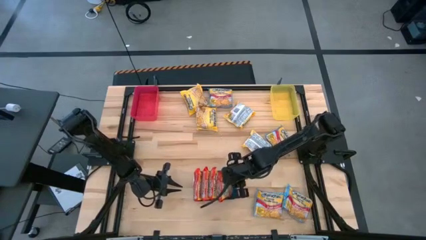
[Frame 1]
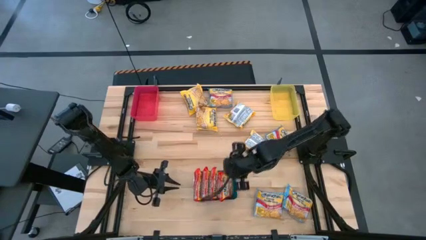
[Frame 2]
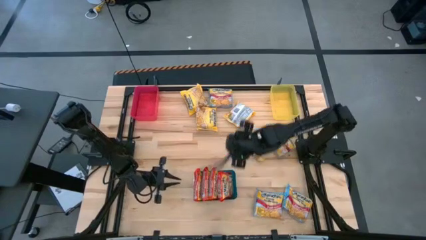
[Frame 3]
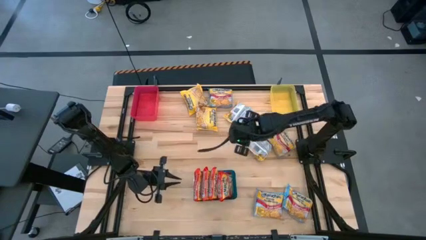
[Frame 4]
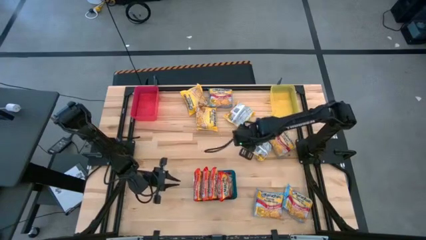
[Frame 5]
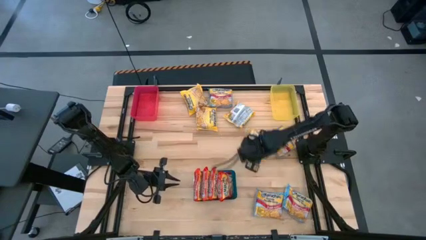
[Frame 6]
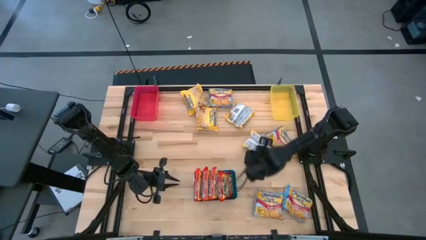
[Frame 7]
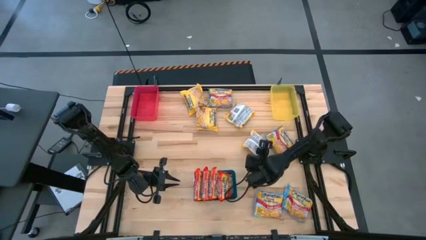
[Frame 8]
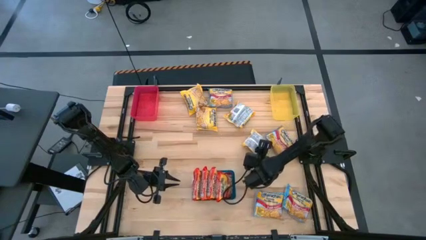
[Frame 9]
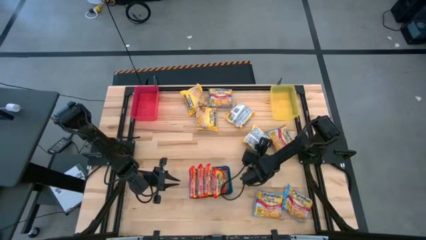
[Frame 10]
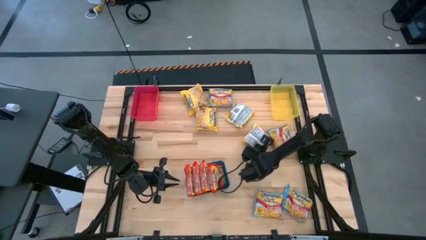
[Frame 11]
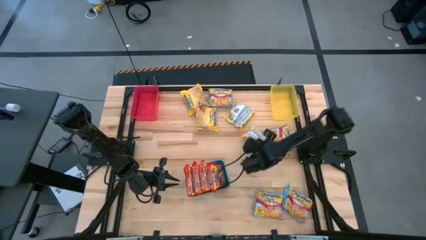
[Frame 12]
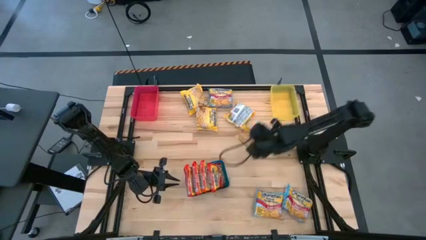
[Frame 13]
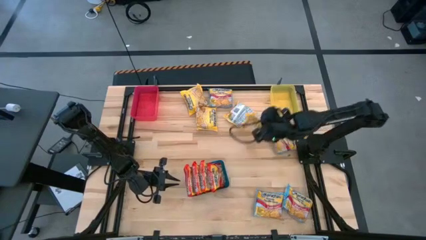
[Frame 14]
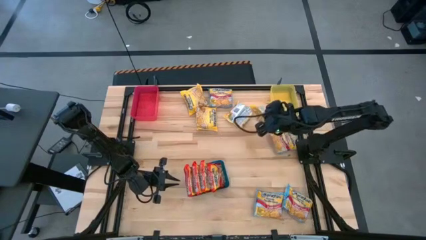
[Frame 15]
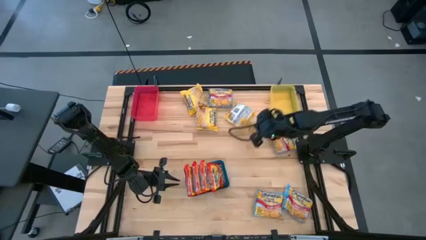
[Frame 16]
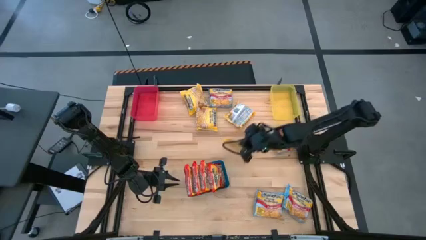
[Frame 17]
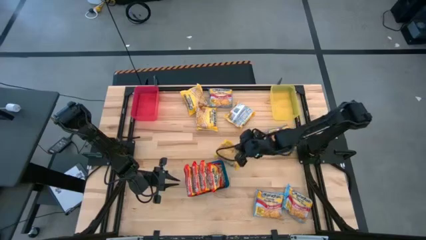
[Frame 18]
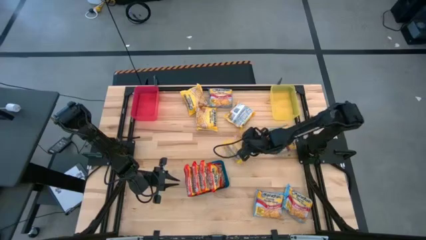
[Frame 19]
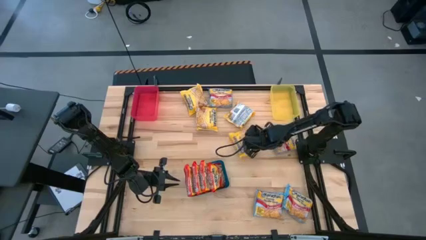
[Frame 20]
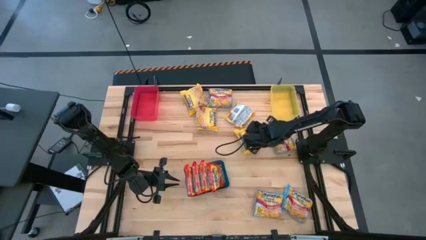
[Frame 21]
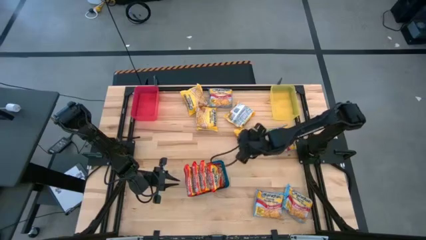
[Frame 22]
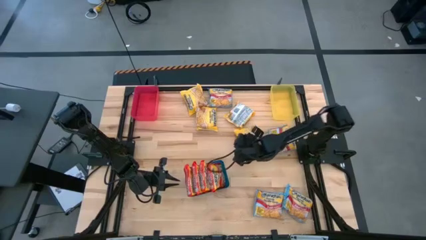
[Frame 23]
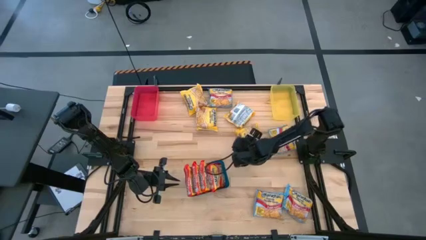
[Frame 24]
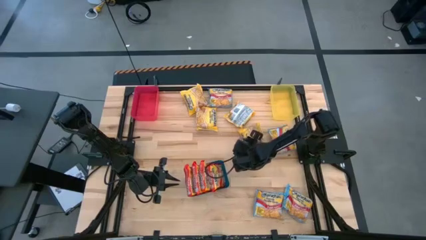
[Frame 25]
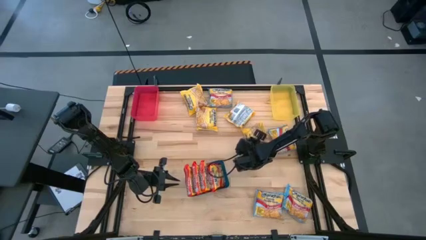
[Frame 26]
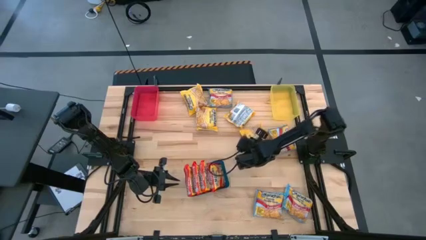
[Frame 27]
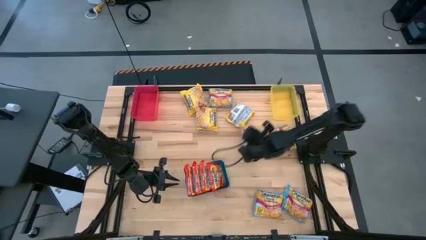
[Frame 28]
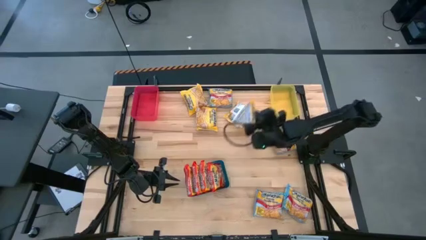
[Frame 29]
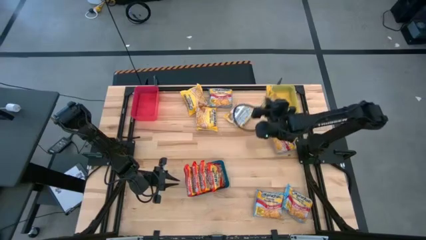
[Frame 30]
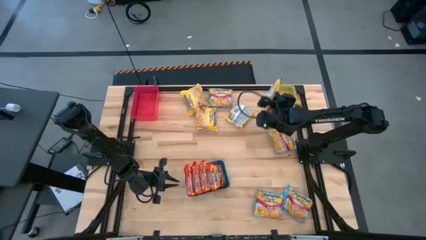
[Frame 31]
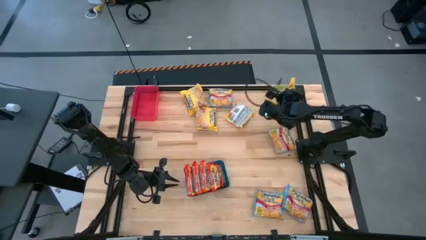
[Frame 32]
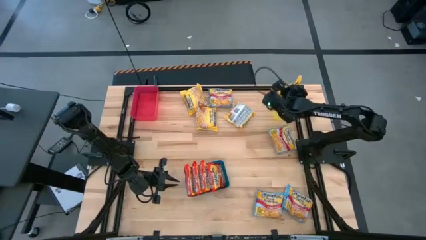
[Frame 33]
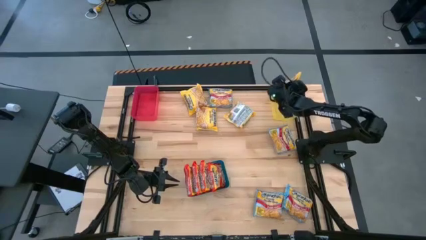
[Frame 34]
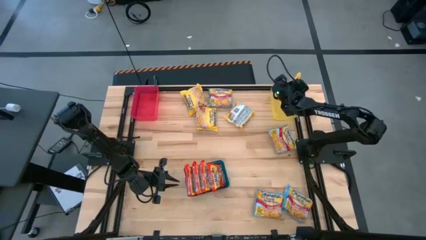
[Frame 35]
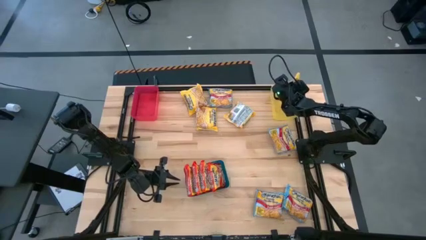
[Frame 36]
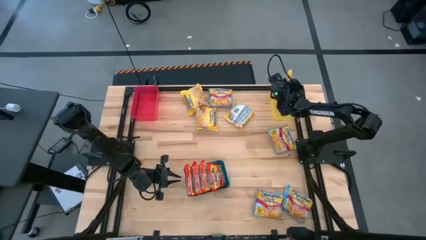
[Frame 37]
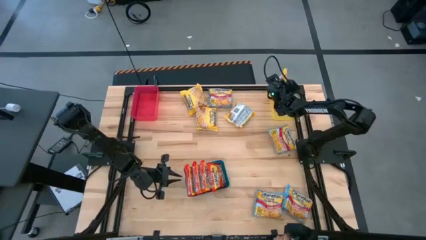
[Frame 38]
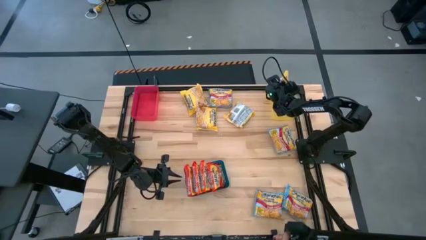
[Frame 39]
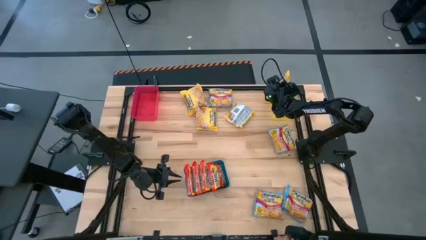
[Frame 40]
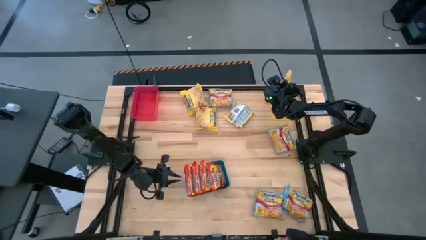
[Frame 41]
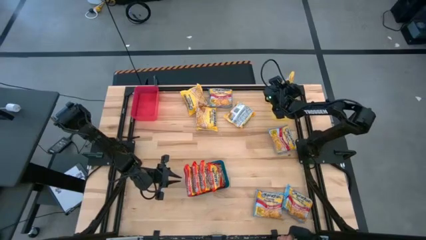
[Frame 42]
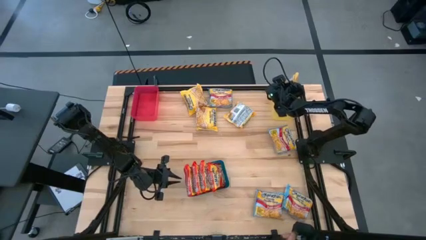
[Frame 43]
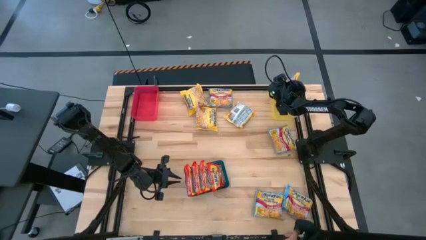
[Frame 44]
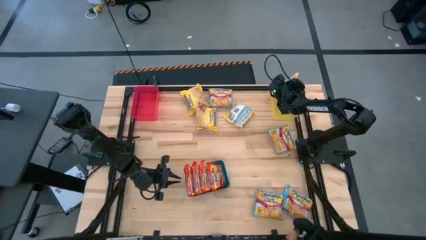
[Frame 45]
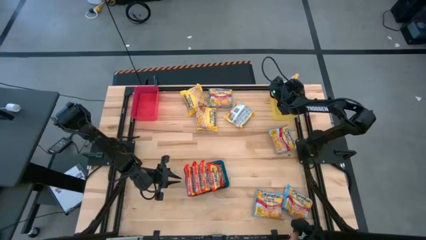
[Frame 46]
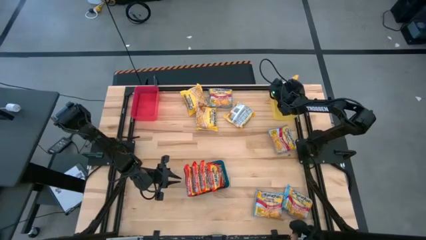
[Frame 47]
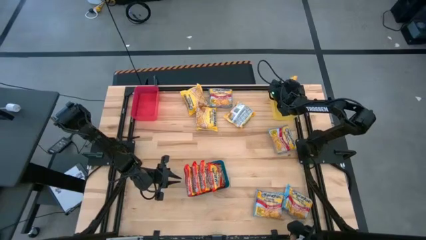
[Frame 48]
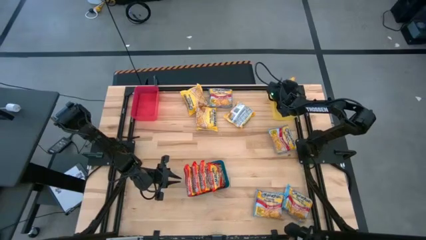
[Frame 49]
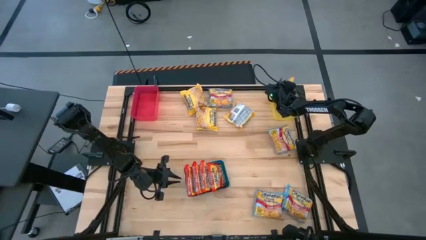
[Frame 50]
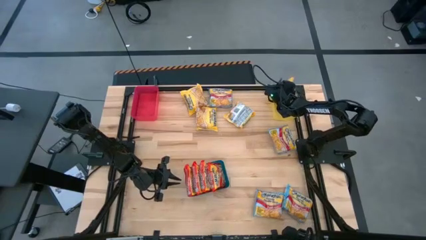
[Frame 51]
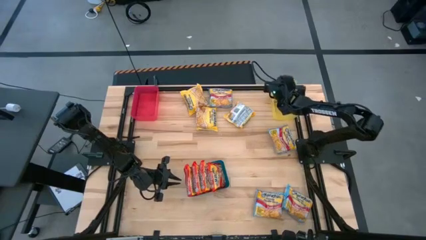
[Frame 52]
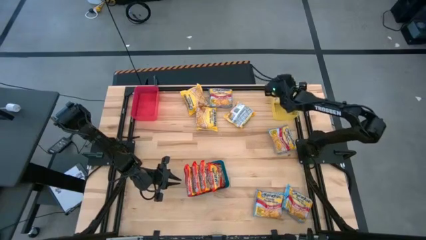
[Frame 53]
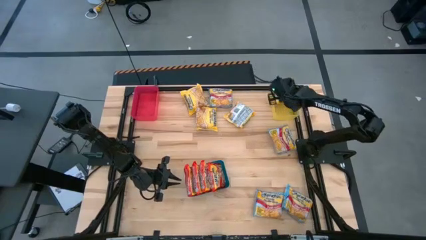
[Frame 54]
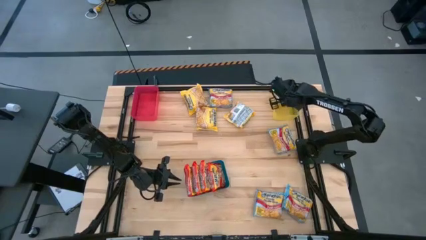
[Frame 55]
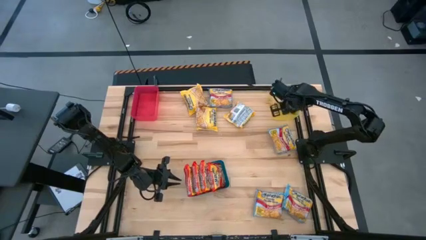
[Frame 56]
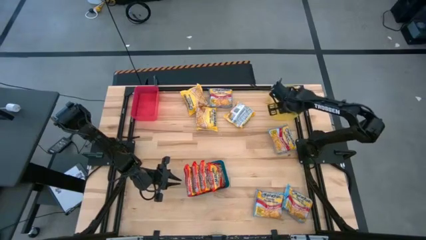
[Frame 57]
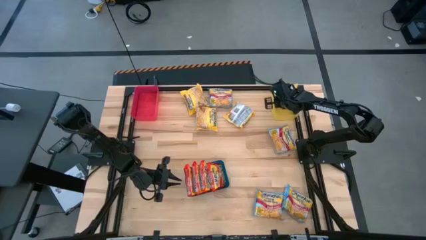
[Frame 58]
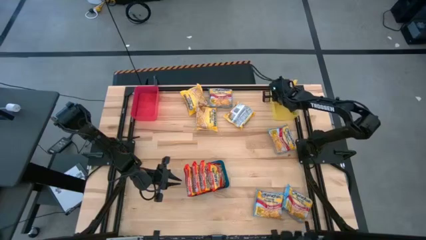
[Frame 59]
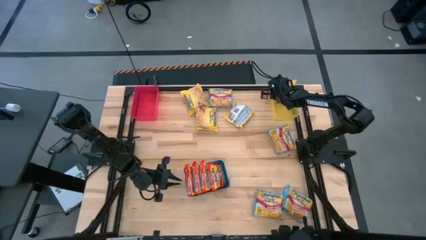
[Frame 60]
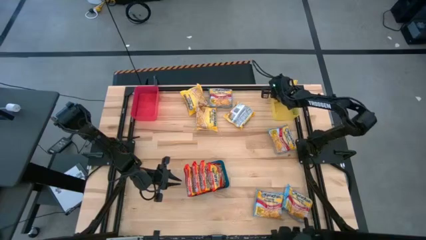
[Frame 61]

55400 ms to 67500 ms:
Task: Sort Maruchan noodles
Put the yellow noodle pack into the yellow bin

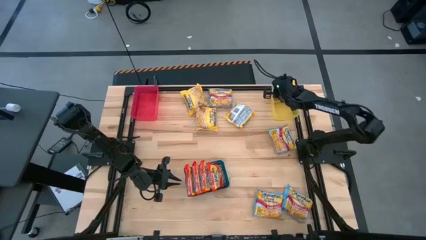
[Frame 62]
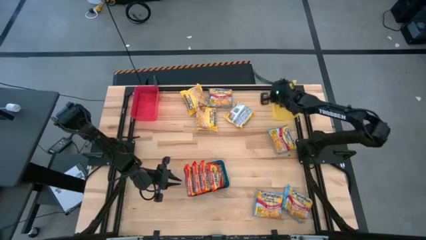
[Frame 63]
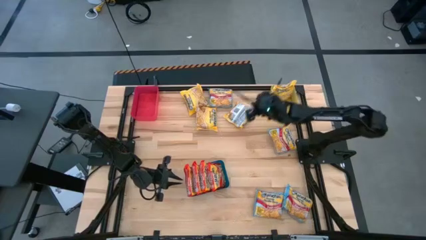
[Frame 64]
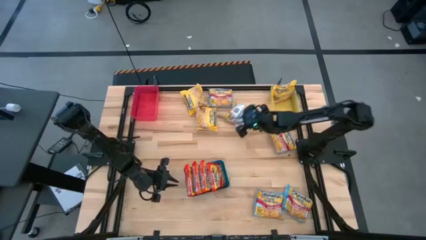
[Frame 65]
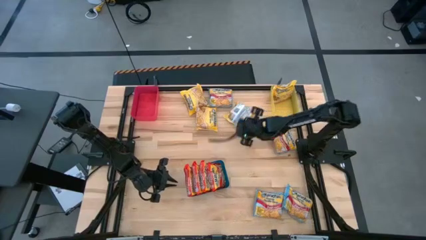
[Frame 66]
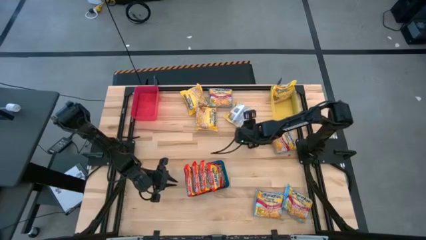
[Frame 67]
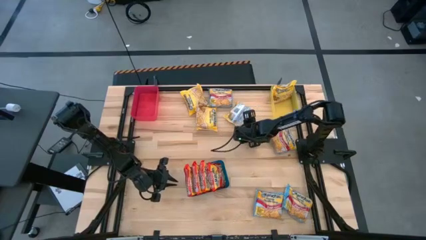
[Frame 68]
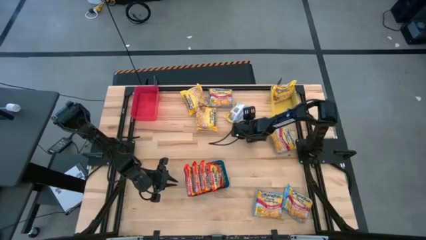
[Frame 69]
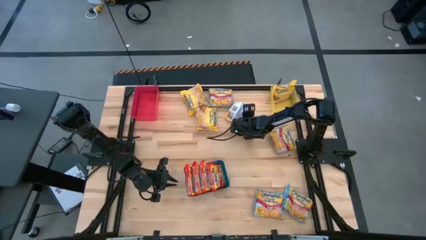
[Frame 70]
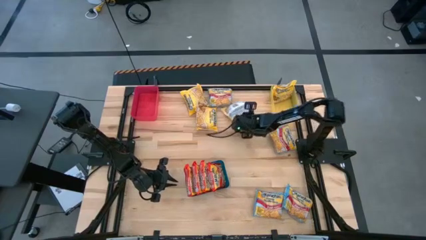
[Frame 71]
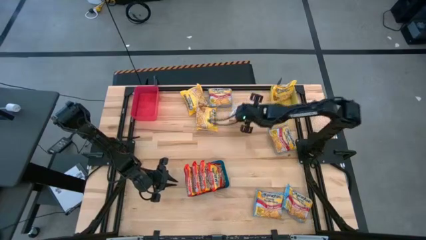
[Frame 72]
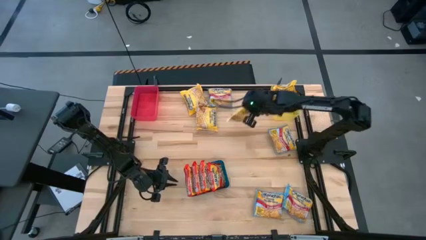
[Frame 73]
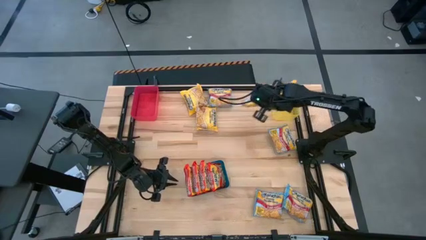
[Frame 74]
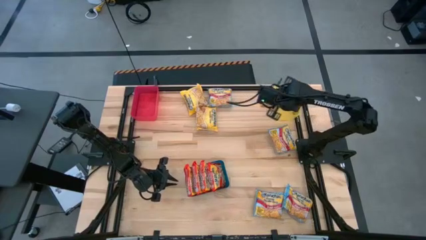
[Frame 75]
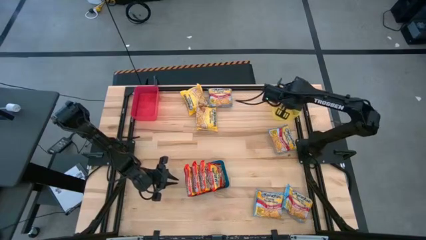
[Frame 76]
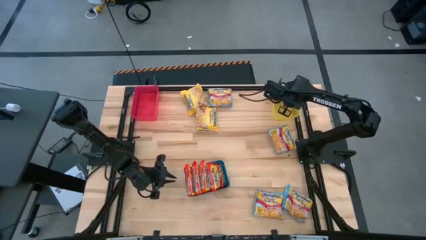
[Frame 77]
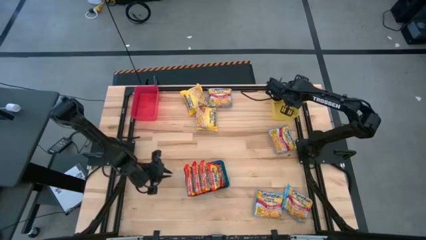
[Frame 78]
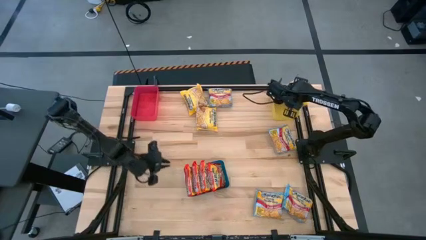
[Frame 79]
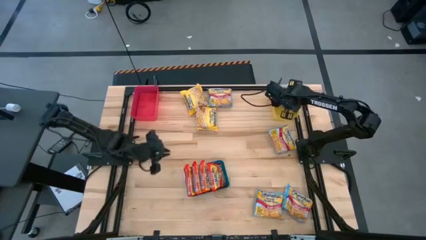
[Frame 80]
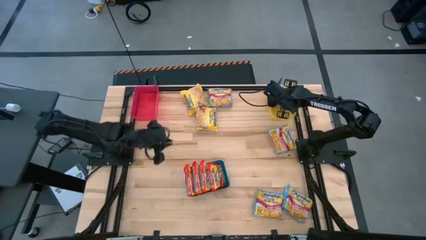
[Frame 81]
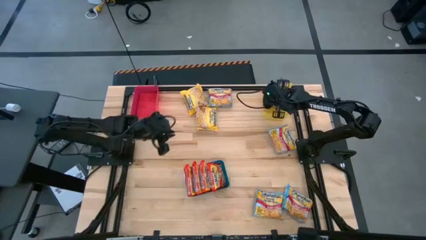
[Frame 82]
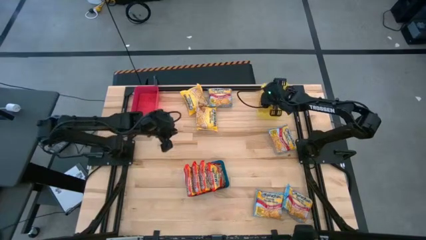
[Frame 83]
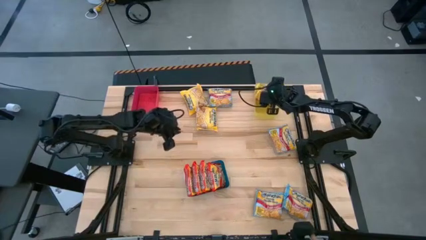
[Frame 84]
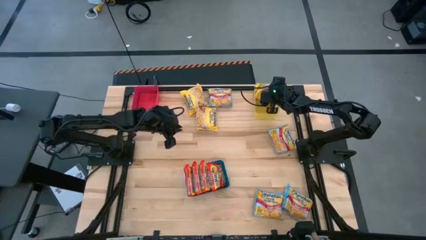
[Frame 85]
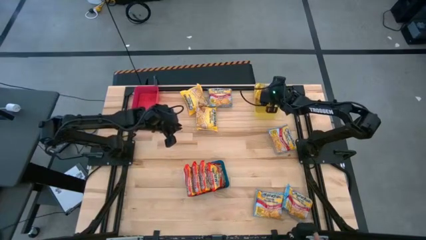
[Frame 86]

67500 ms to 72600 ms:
Put the yellow noodle pack into the yellow bin
